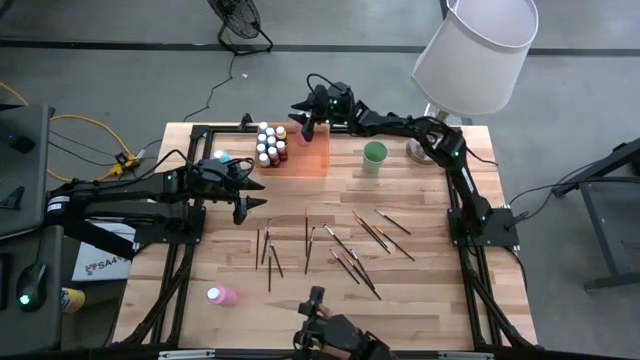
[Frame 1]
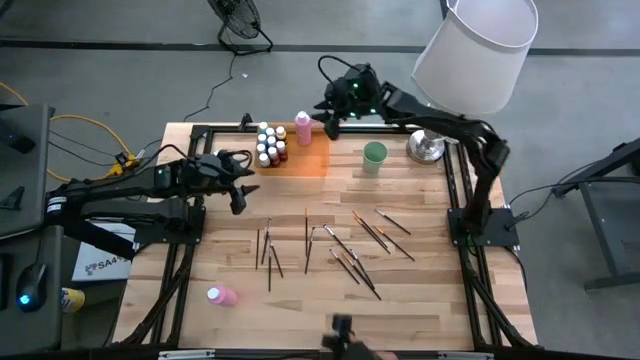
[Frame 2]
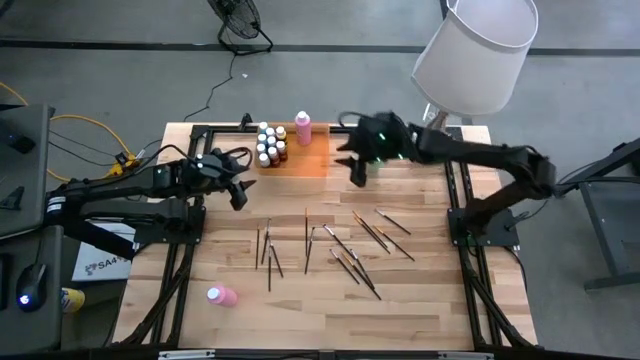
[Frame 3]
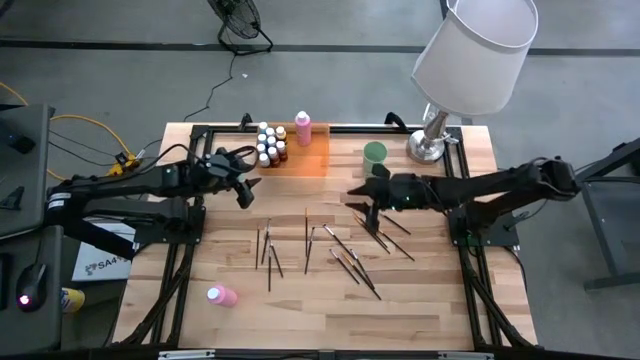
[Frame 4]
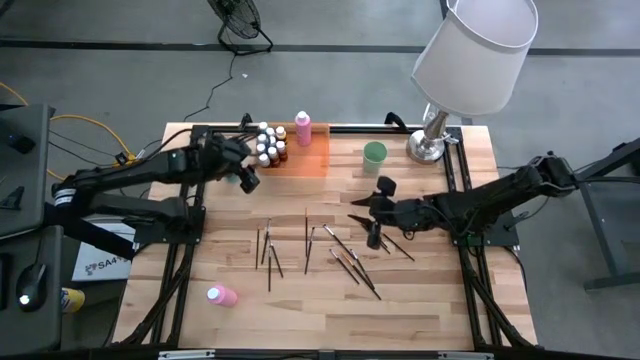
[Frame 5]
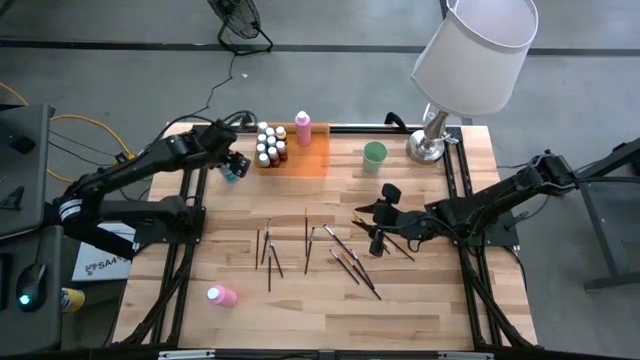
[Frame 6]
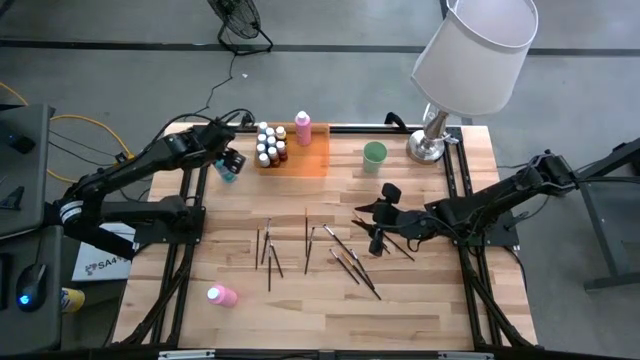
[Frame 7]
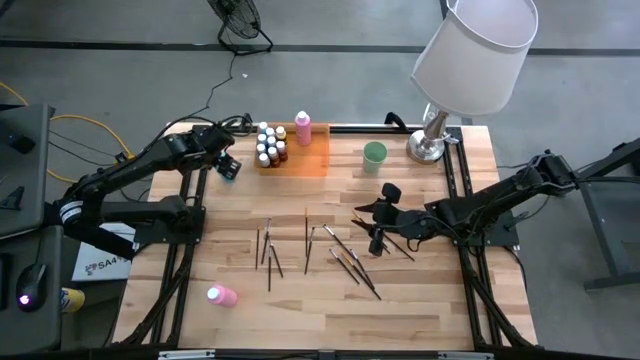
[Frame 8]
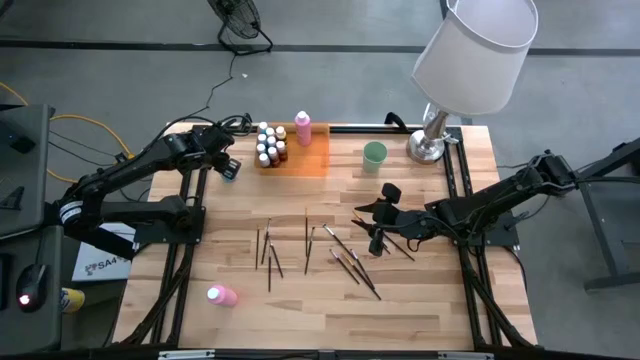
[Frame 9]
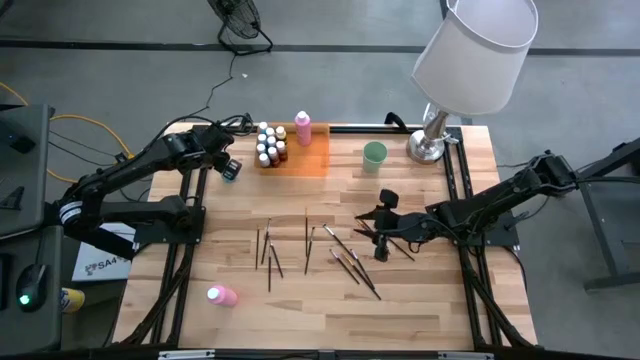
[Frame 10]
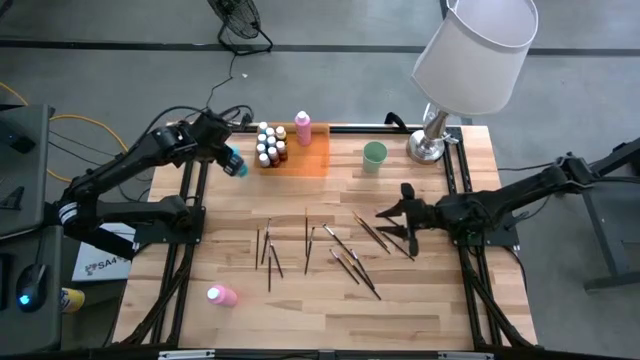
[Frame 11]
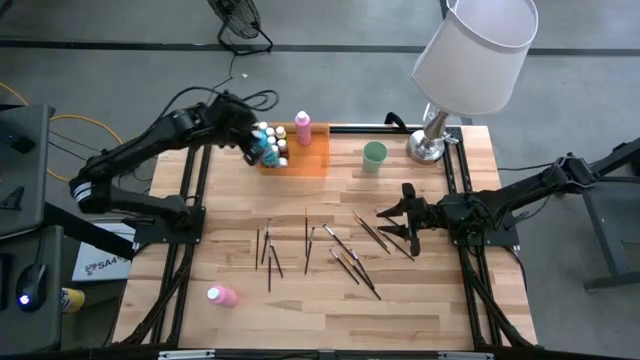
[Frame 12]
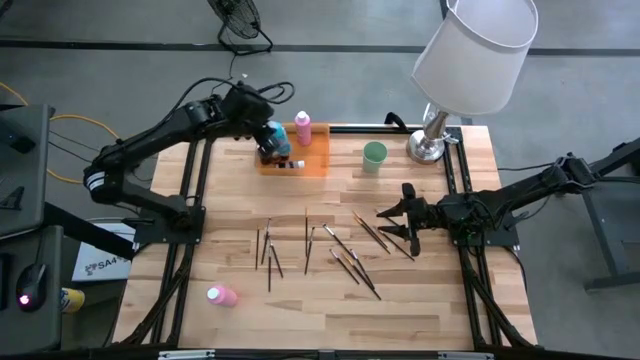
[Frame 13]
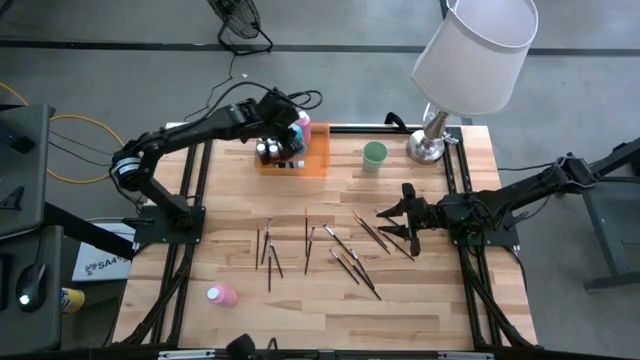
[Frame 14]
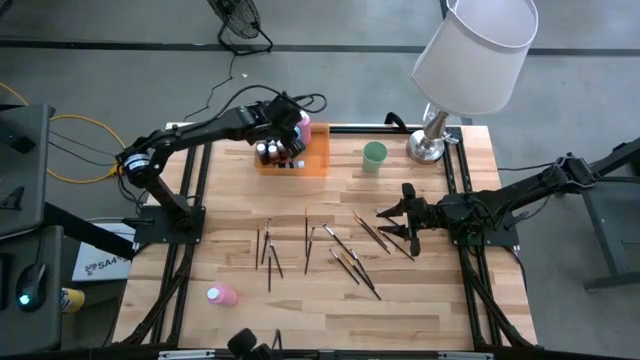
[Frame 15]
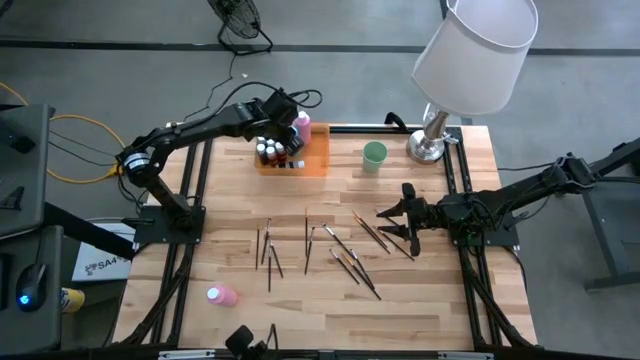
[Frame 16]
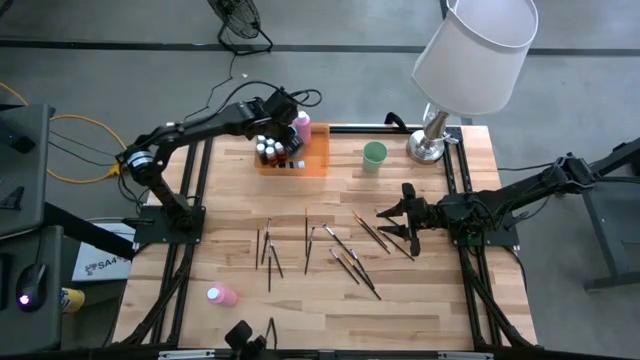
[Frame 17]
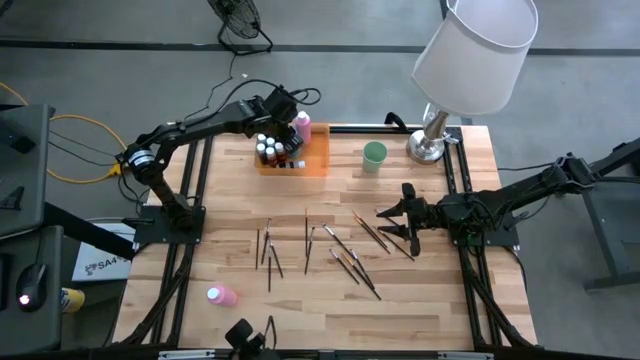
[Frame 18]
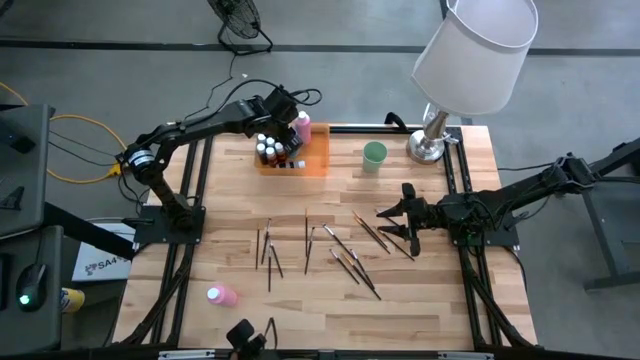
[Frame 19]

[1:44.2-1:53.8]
Task: Pick & Place Paint Supplies
Put the large light blue paint bottle into the orange bin

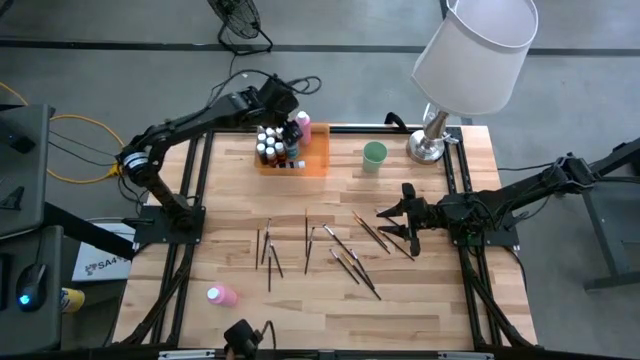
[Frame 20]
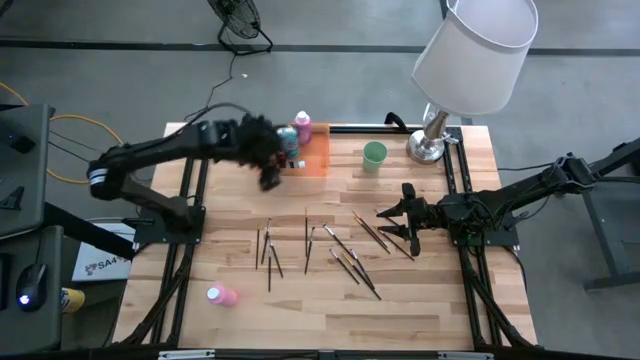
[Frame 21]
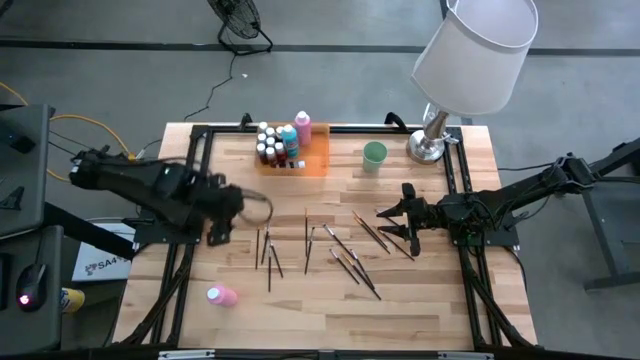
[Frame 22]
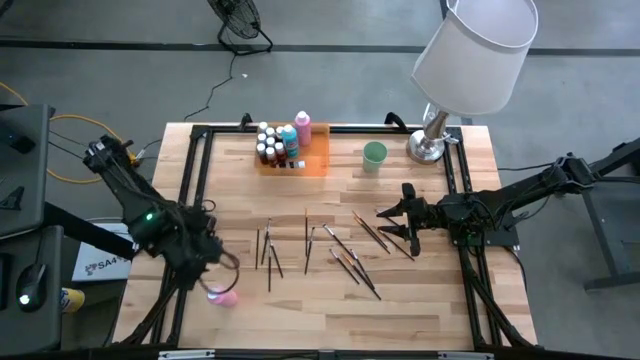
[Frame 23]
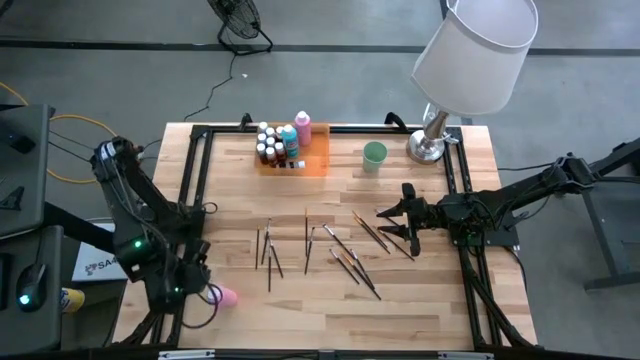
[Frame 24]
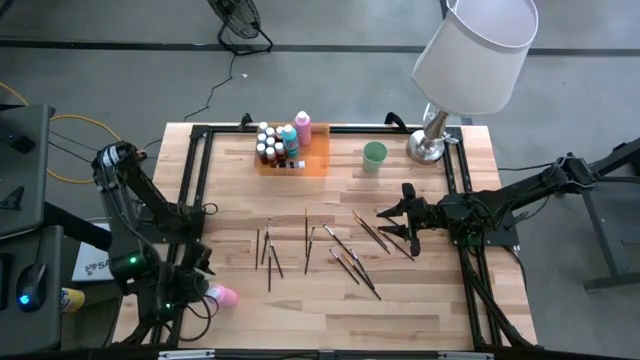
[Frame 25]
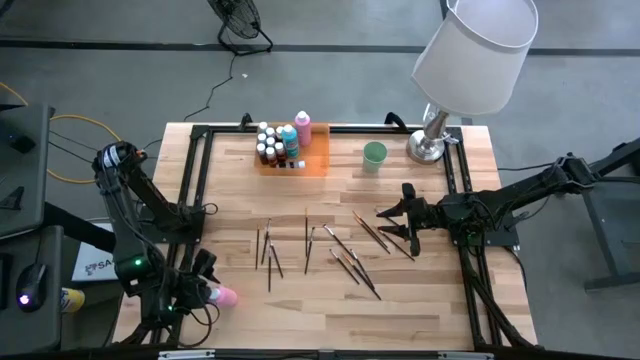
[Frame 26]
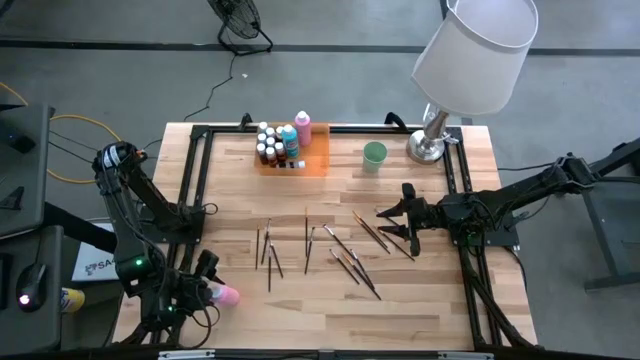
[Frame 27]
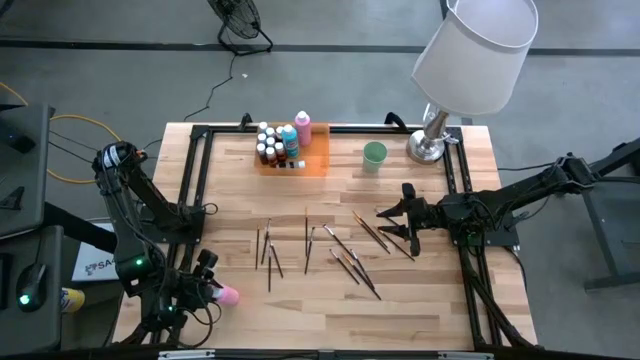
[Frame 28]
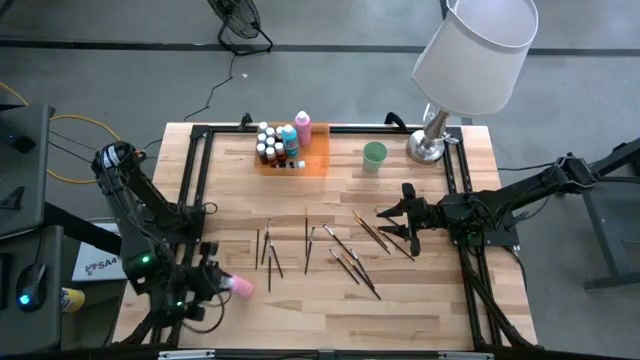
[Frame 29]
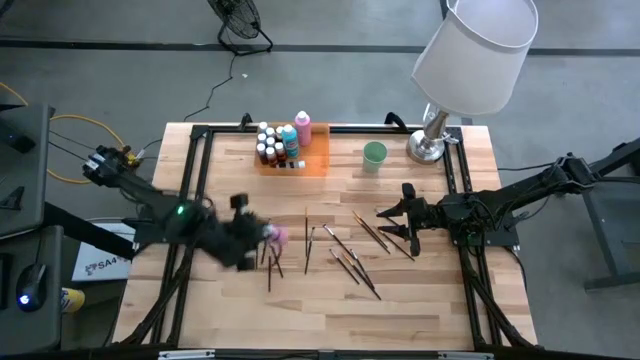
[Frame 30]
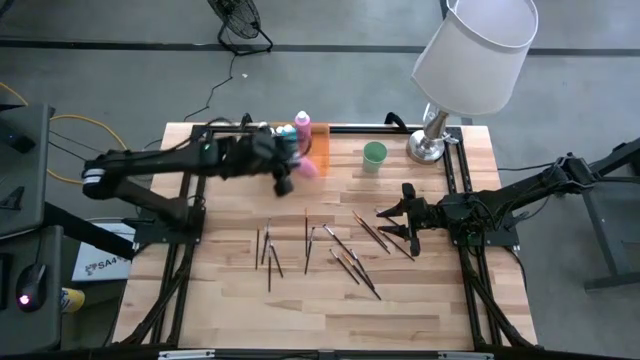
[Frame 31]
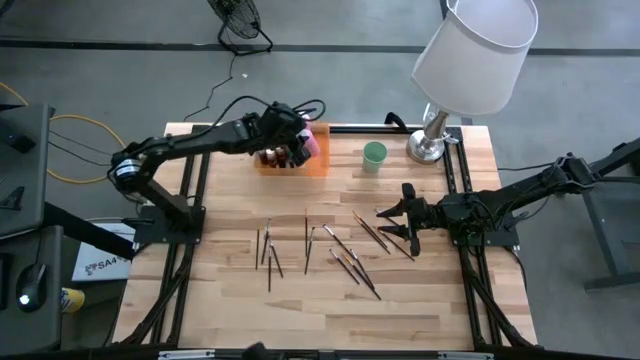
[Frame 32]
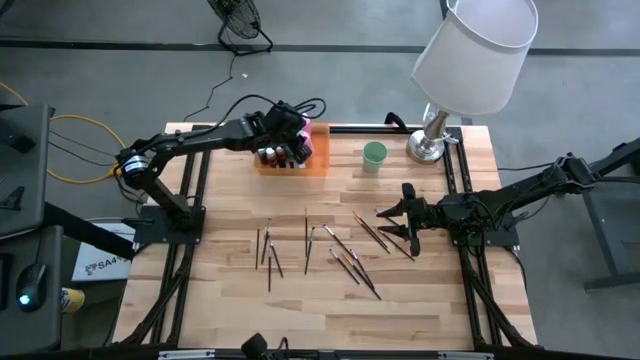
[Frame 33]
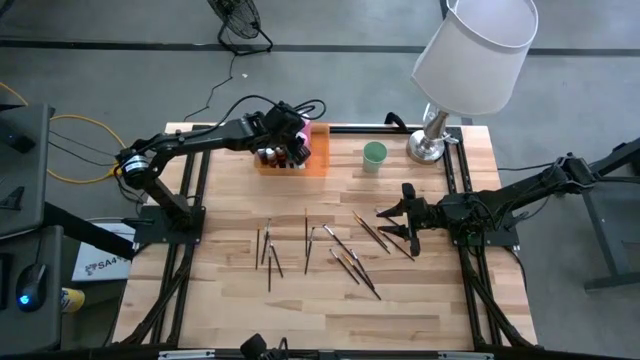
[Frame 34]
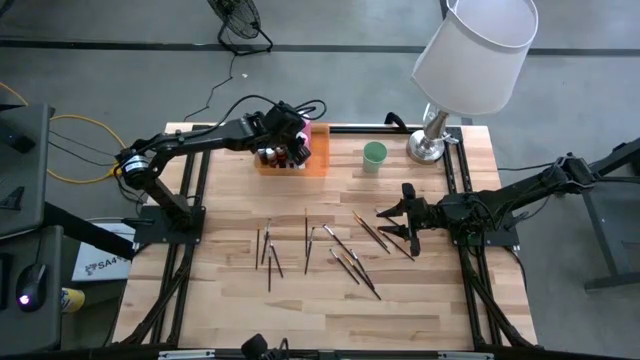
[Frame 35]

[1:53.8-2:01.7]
Put the large pink paint bottle into the orange bin
